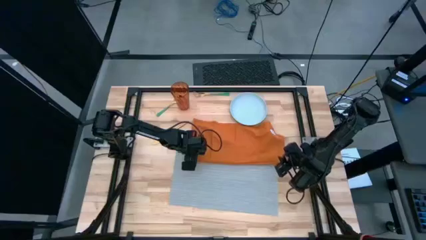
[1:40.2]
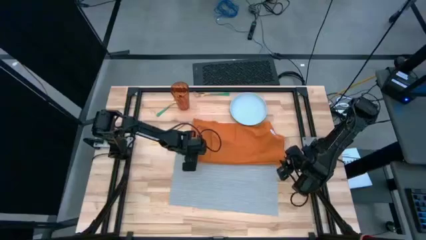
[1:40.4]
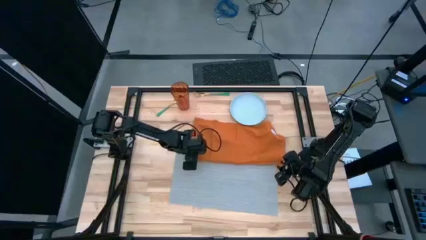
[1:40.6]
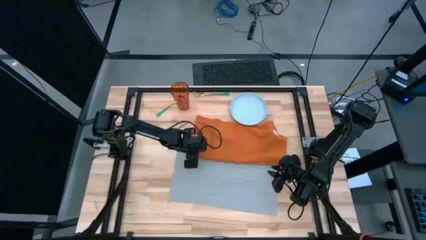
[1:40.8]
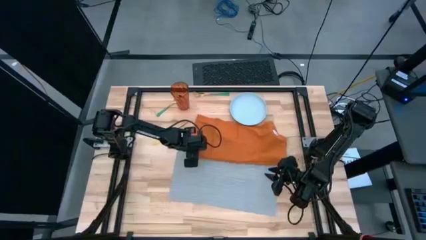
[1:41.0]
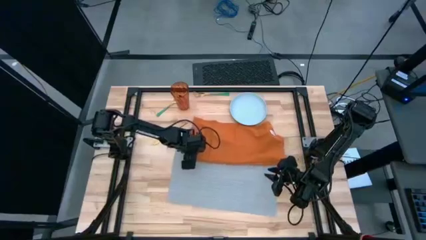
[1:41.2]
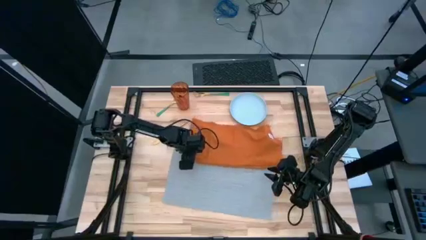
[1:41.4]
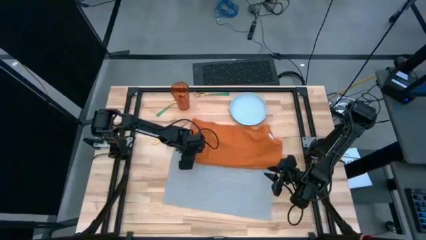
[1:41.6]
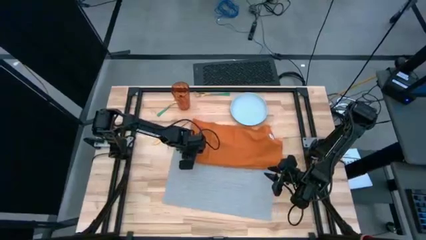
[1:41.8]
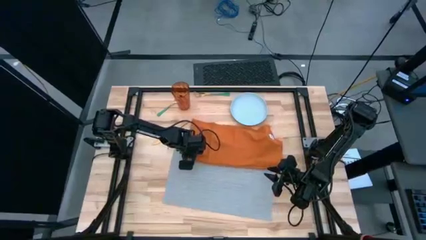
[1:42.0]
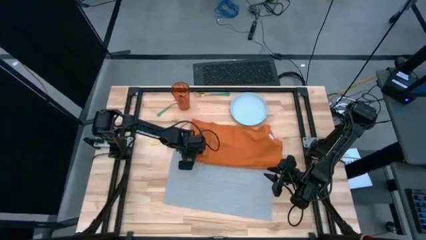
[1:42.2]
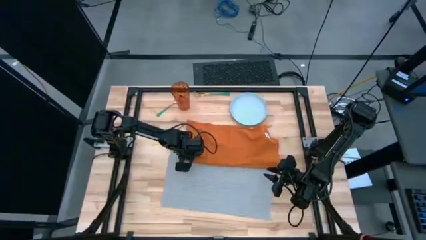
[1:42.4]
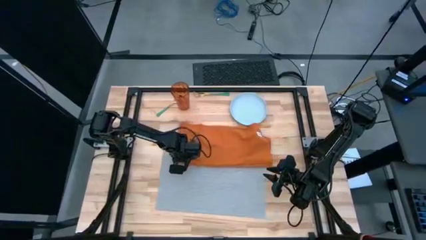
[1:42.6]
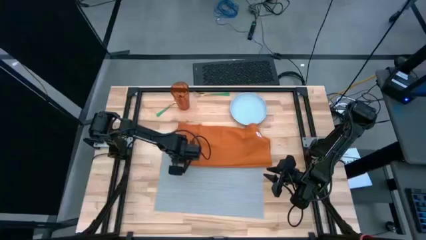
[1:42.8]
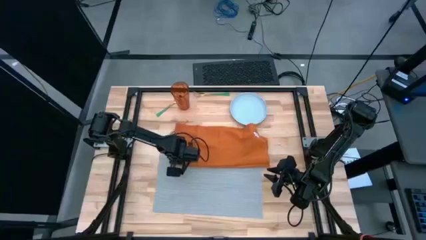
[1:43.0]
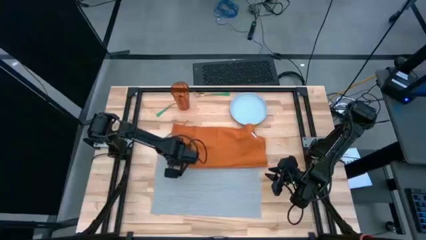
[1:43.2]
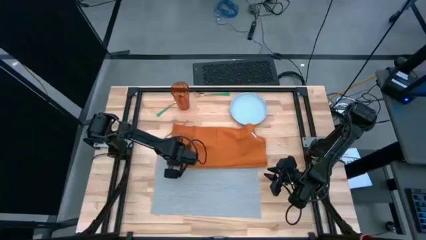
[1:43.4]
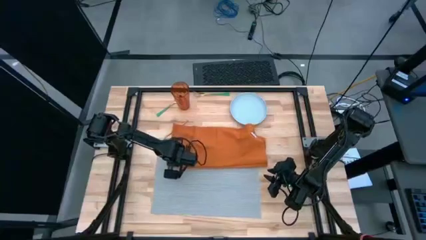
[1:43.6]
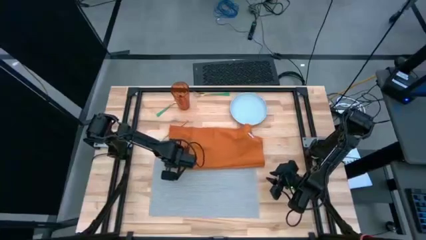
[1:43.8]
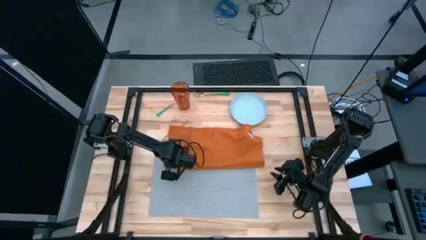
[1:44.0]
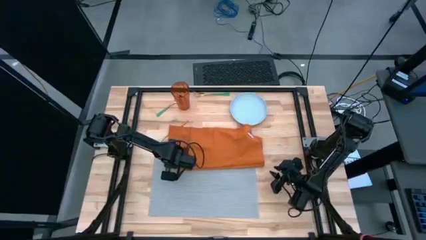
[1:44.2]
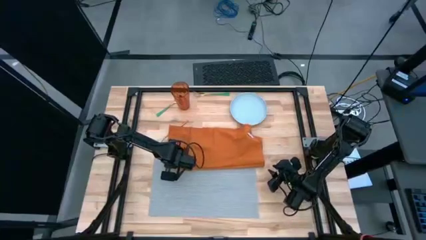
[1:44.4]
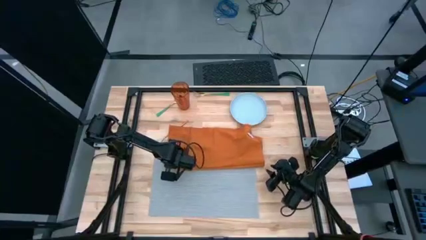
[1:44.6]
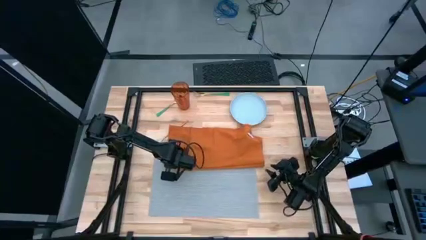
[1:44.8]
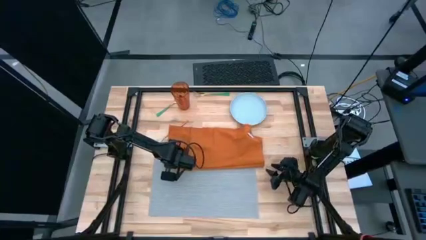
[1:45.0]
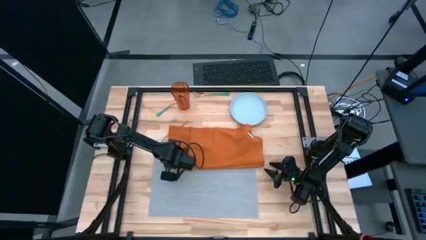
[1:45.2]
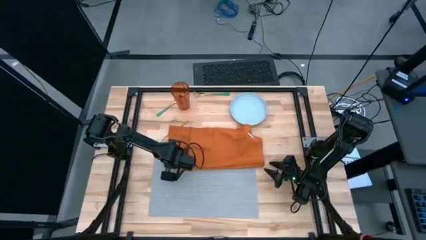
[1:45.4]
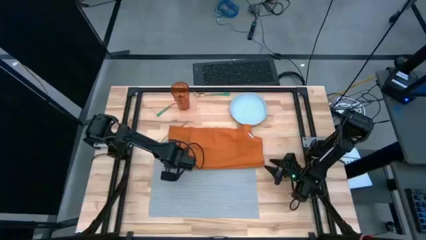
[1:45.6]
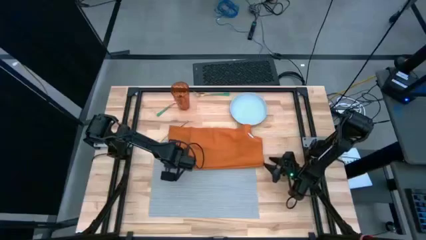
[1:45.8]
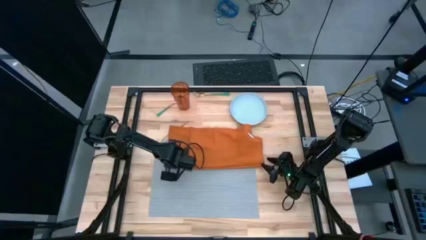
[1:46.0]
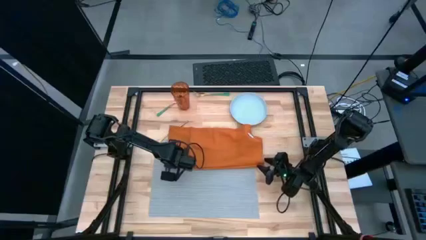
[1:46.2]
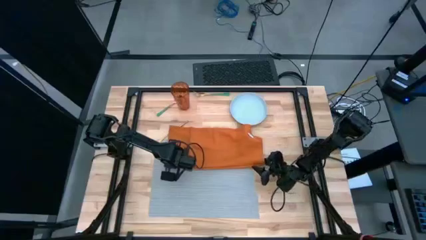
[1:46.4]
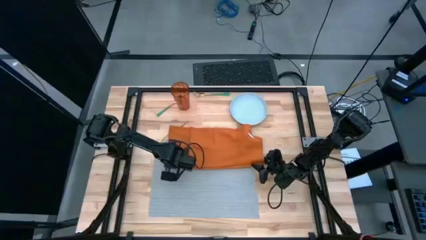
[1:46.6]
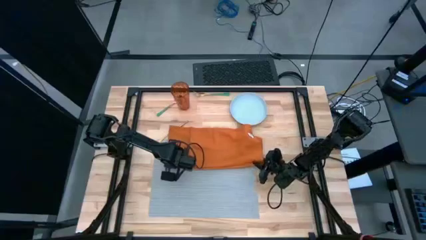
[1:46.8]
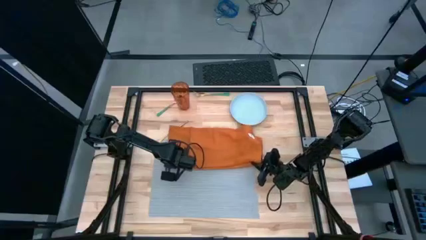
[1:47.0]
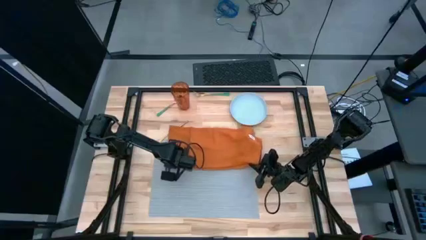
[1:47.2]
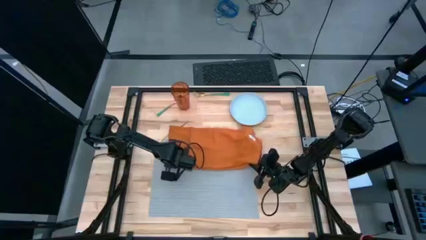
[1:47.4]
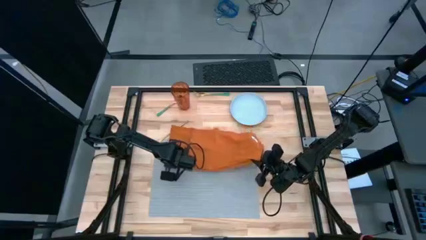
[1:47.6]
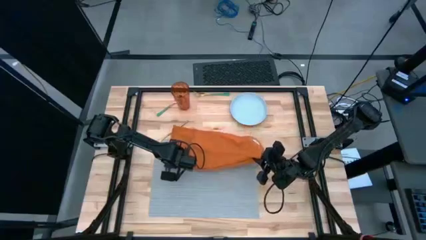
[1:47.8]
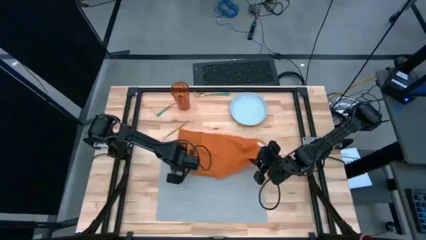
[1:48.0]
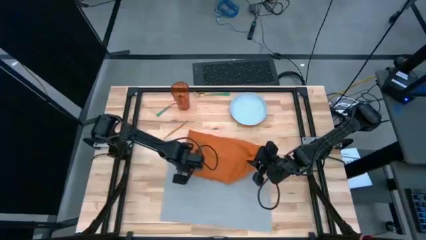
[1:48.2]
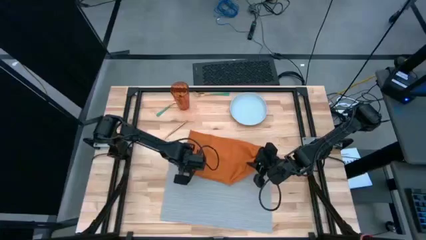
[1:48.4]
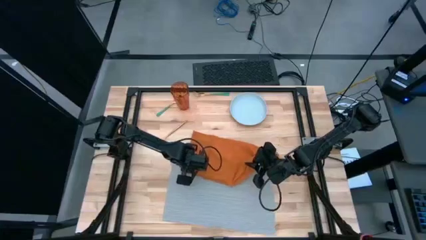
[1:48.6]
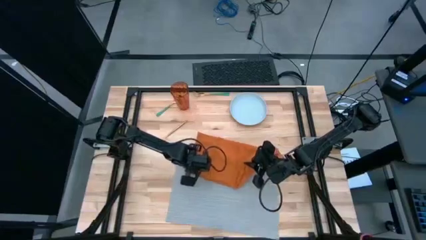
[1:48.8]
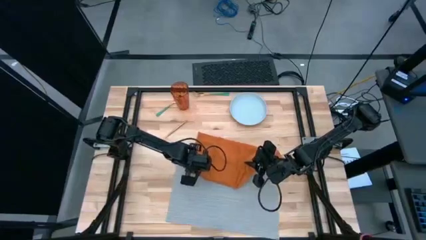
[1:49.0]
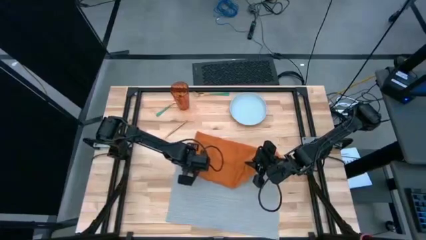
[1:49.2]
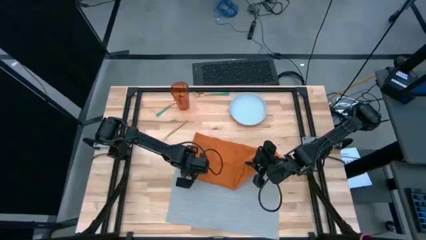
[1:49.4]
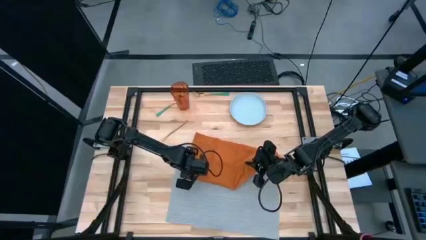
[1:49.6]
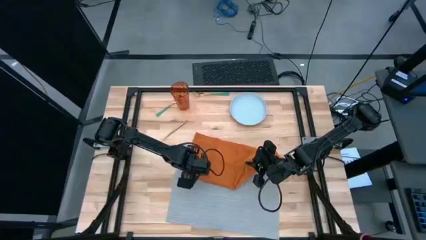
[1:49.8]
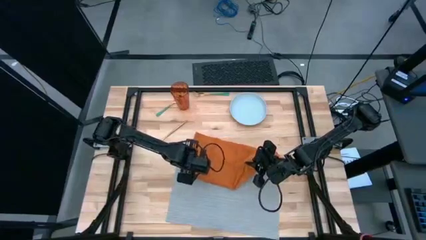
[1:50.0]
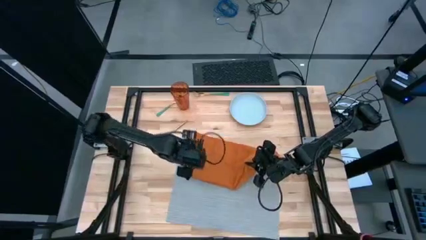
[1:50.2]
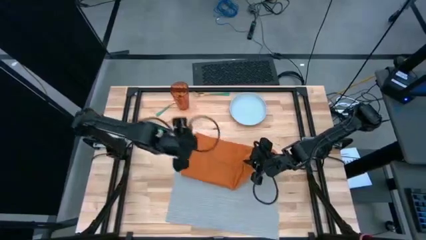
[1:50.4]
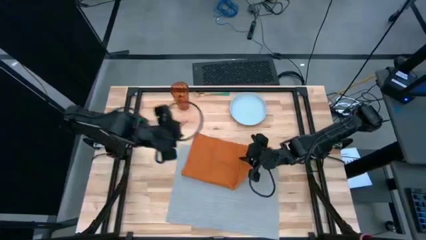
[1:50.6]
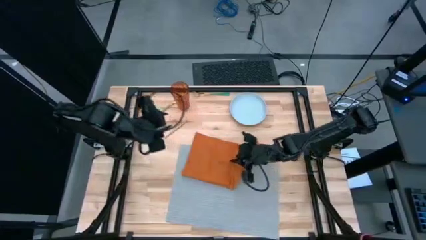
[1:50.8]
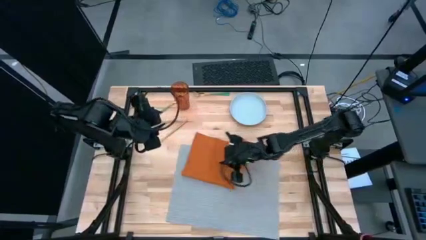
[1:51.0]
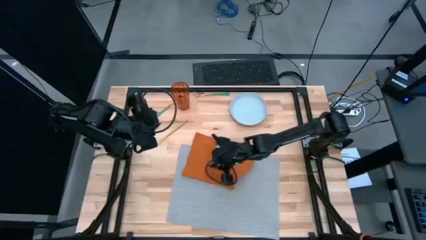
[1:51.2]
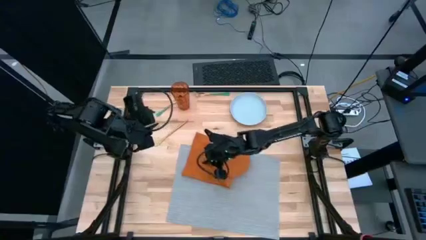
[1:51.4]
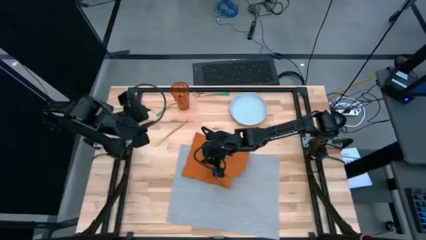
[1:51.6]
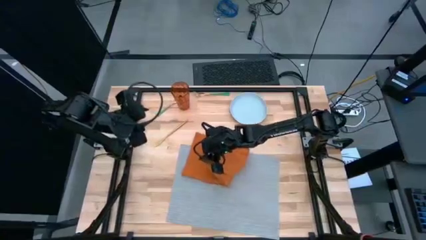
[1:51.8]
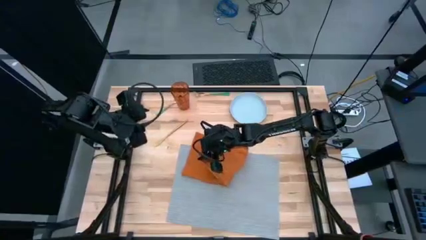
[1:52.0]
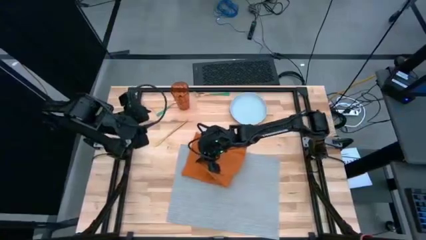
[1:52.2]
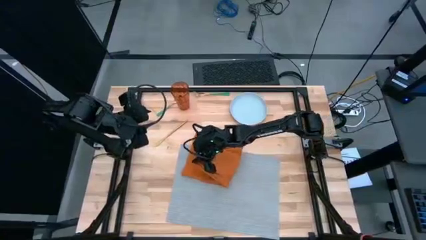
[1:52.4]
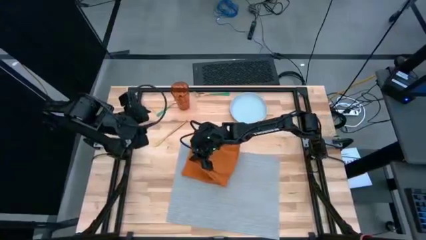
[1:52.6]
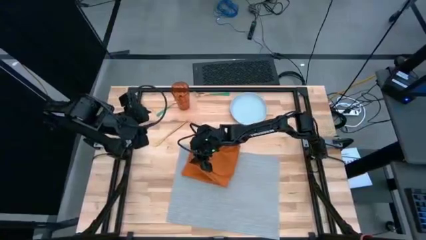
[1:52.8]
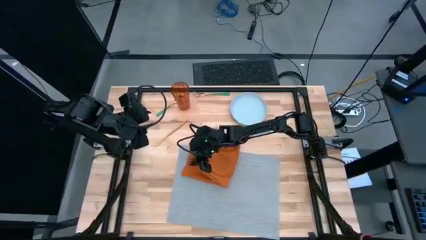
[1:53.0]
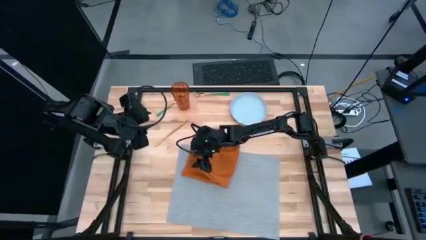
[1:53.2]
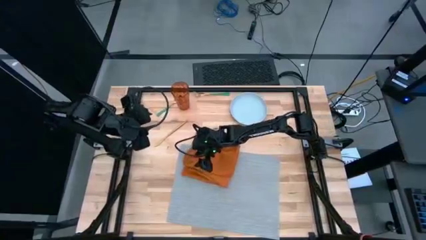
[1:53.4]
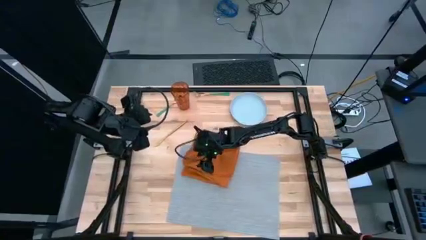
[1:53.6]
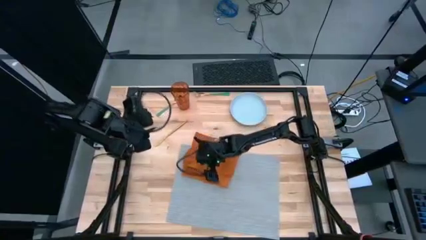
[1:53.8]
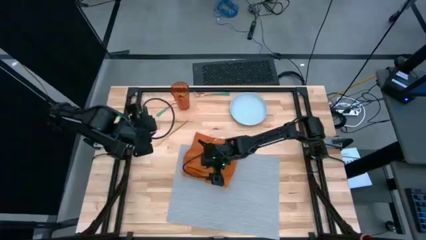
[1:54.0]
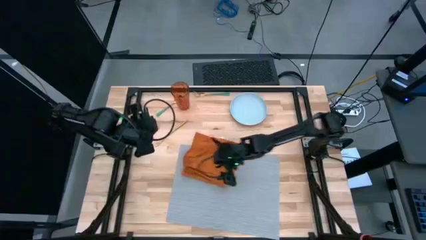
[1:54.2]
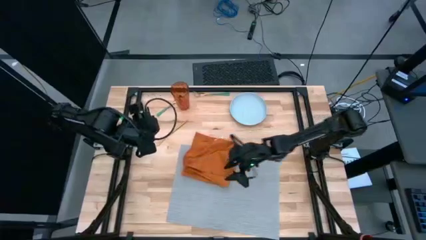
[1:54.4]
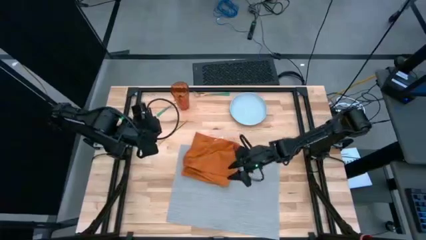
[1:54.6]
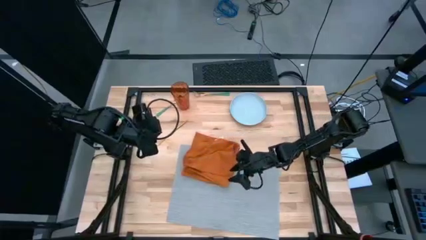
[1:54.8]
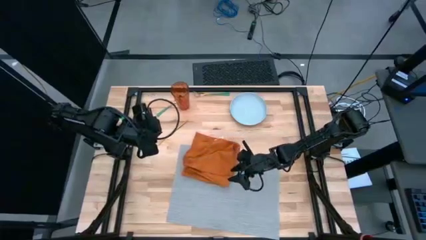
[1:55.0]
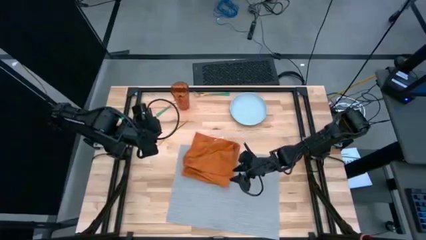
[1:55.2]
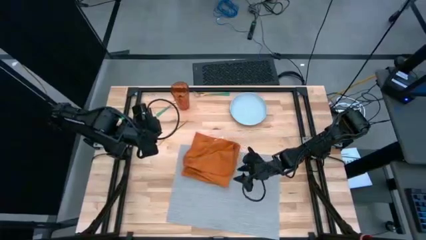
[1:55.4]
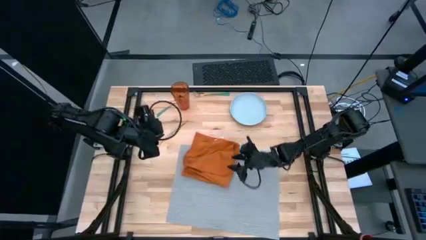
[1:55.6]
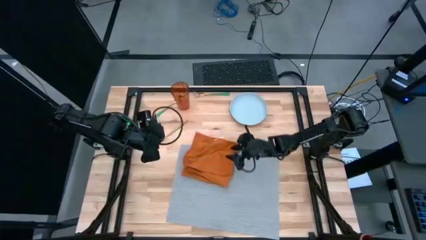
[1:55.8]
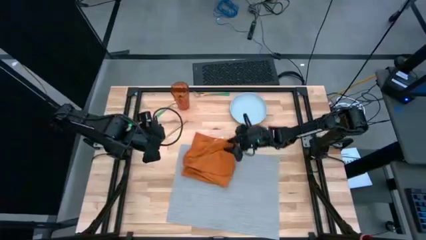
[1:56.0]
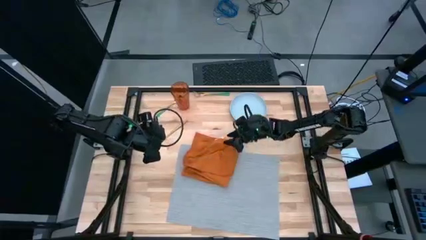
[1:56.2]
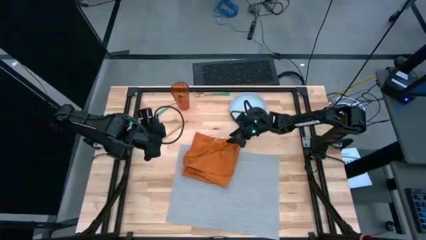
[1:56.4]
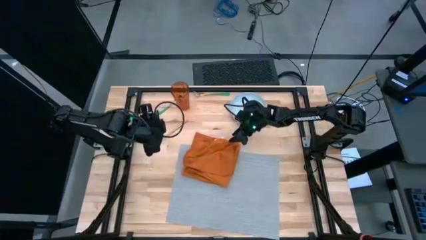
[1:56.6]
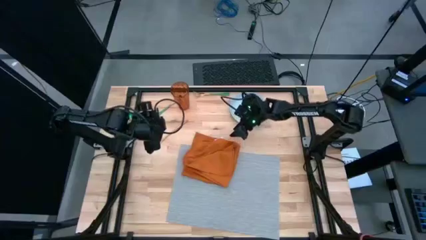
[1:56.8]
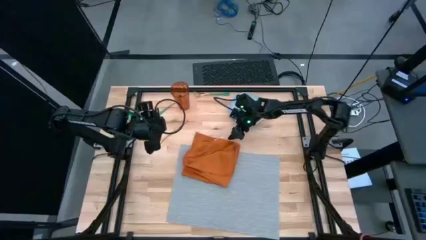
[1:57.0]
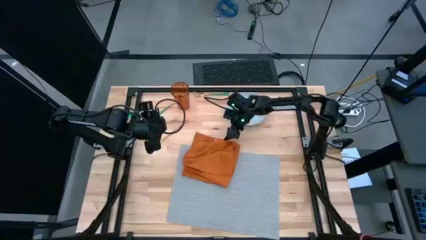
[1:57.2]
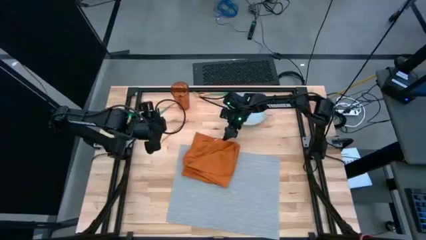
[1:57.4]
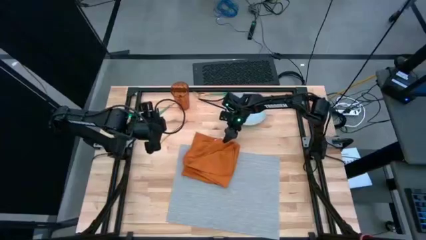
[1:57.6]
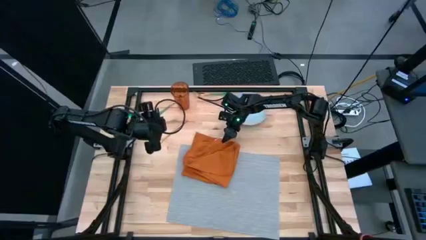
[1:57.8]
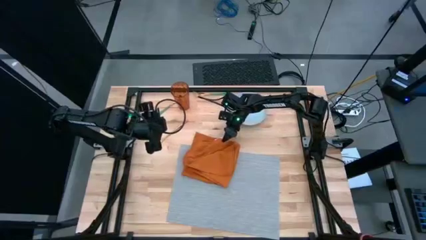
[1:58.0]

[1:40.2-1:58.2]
Task: Set table place
Fold the orange table napkin
